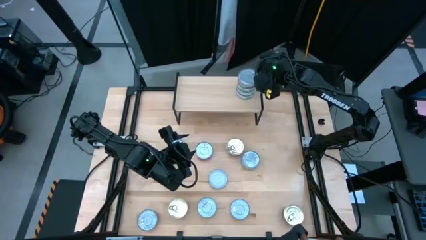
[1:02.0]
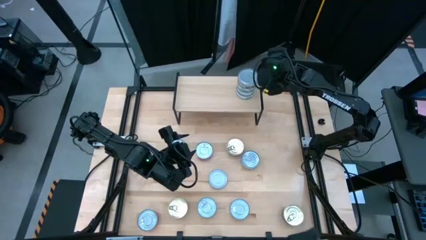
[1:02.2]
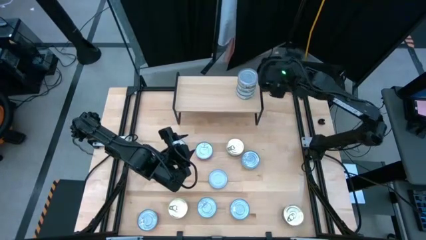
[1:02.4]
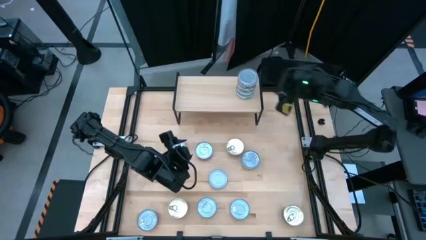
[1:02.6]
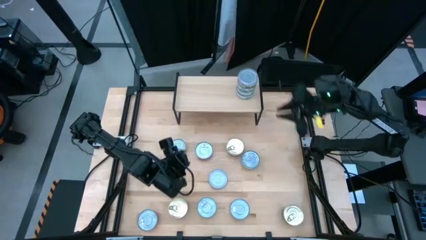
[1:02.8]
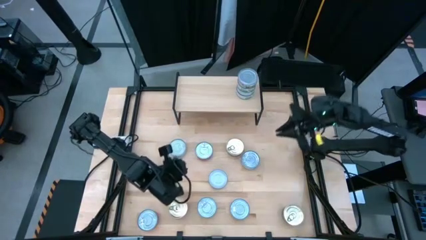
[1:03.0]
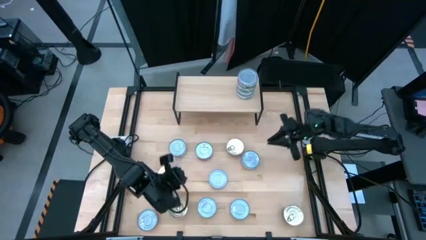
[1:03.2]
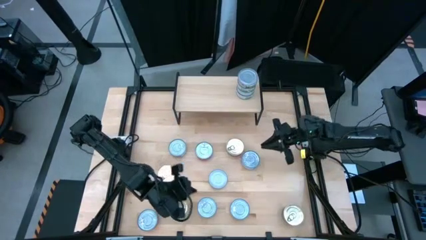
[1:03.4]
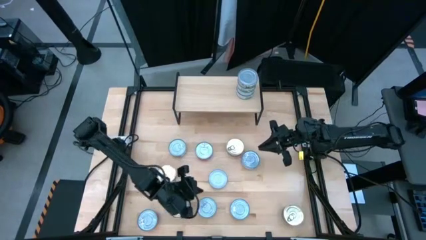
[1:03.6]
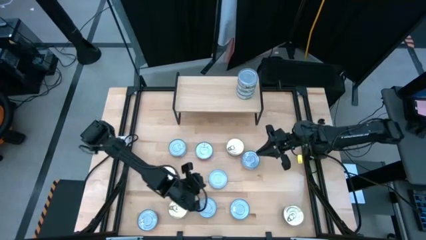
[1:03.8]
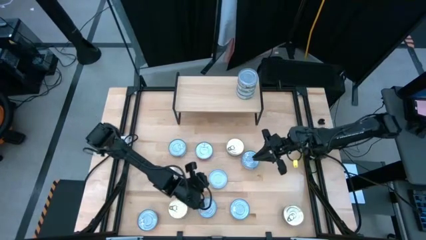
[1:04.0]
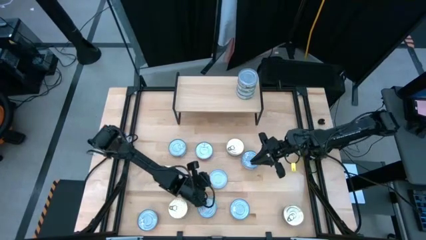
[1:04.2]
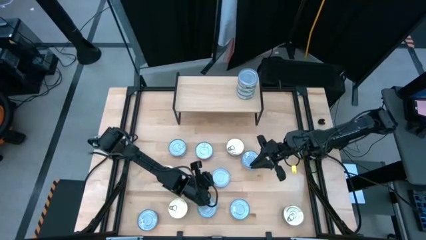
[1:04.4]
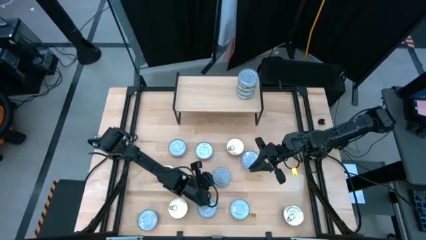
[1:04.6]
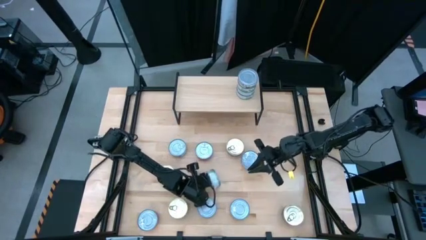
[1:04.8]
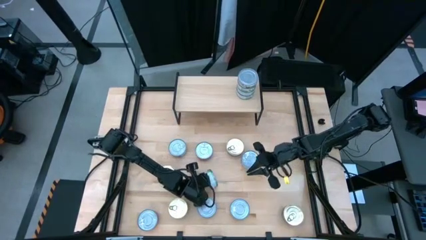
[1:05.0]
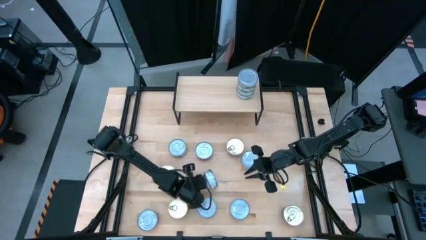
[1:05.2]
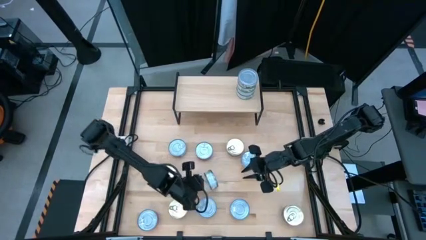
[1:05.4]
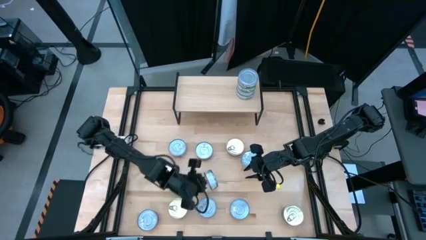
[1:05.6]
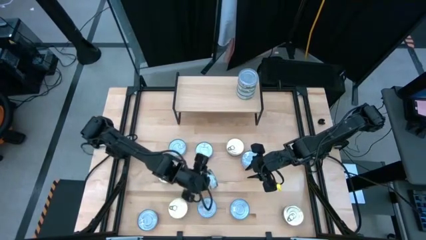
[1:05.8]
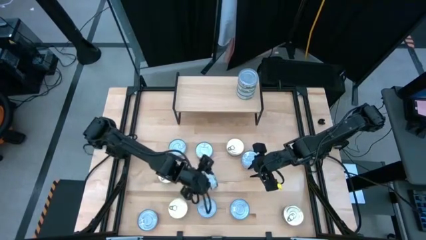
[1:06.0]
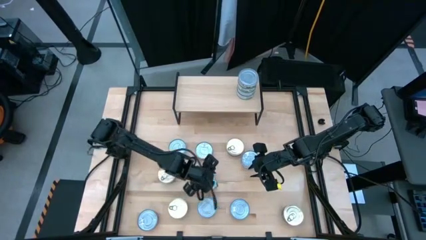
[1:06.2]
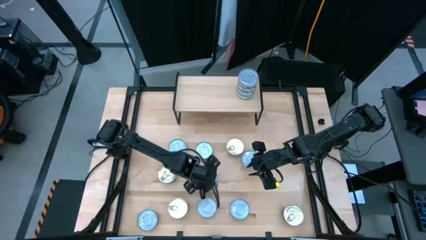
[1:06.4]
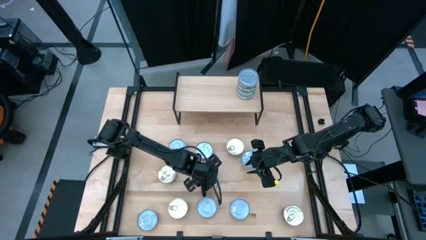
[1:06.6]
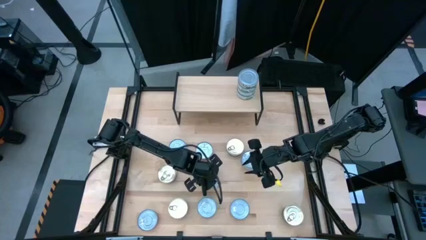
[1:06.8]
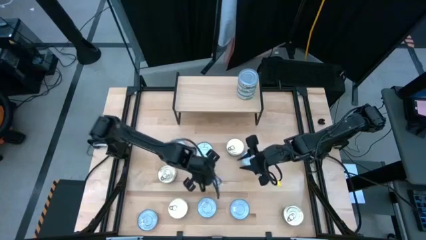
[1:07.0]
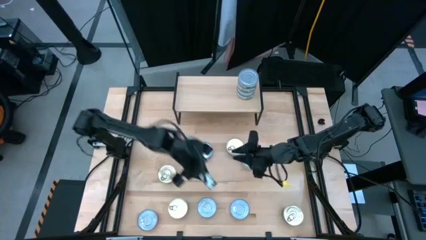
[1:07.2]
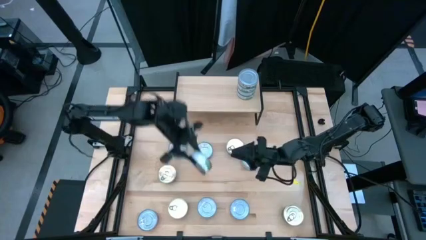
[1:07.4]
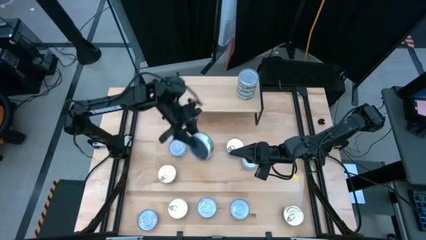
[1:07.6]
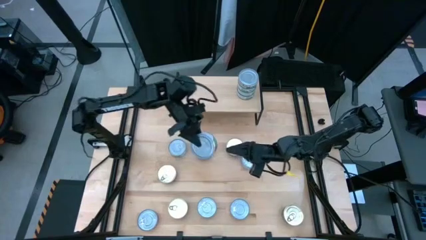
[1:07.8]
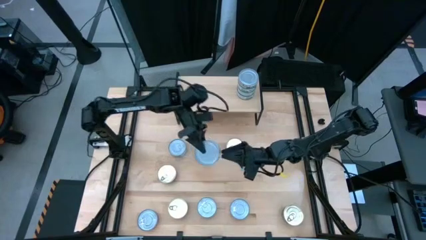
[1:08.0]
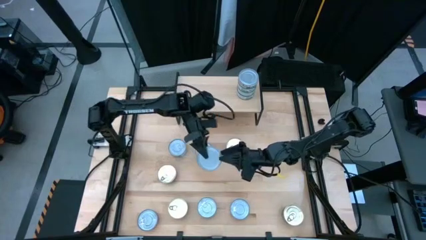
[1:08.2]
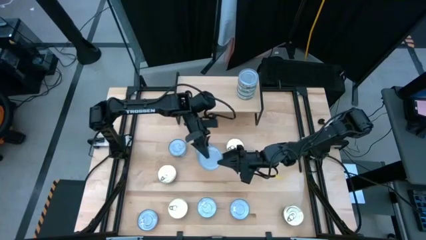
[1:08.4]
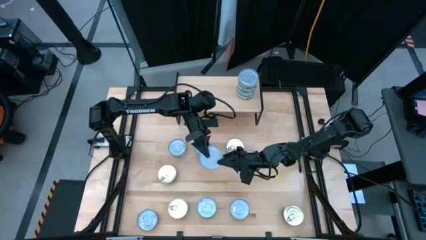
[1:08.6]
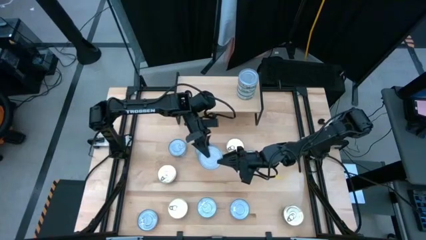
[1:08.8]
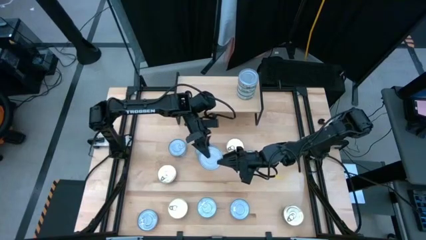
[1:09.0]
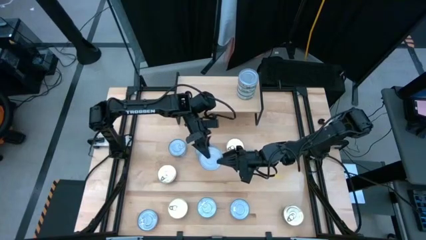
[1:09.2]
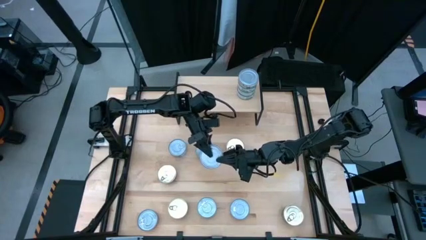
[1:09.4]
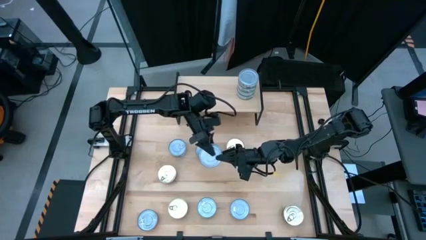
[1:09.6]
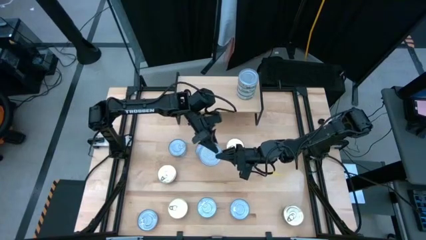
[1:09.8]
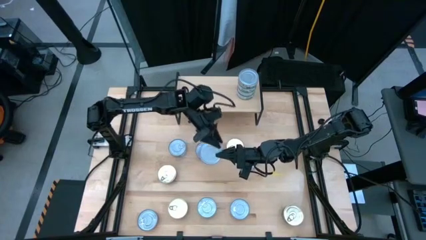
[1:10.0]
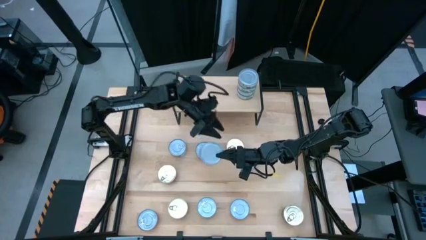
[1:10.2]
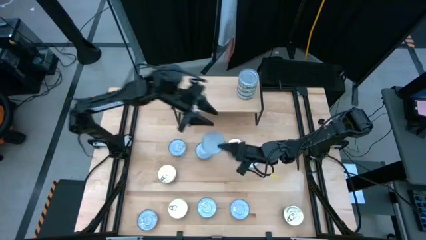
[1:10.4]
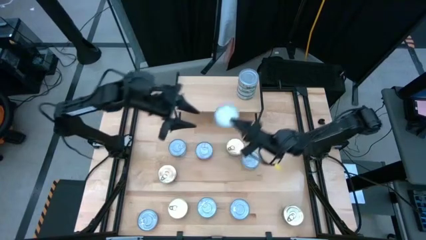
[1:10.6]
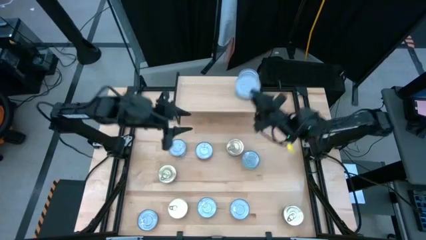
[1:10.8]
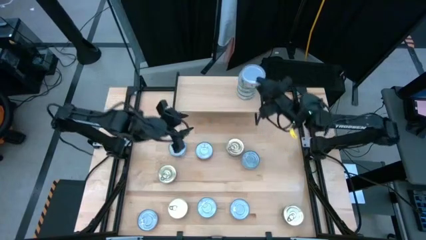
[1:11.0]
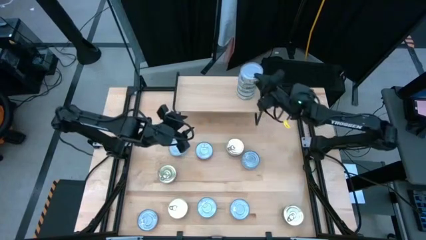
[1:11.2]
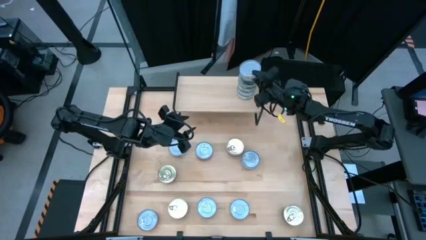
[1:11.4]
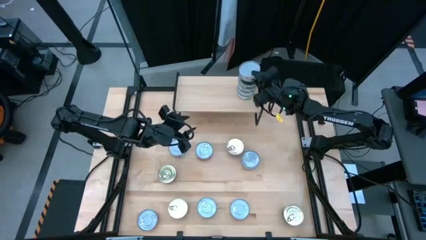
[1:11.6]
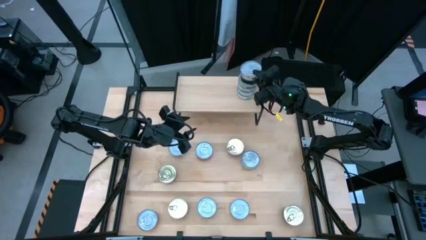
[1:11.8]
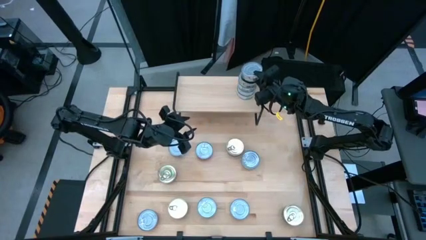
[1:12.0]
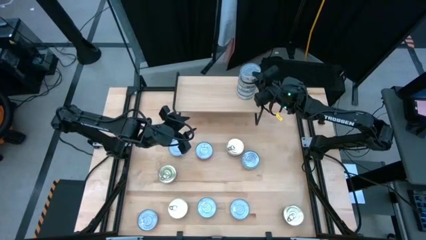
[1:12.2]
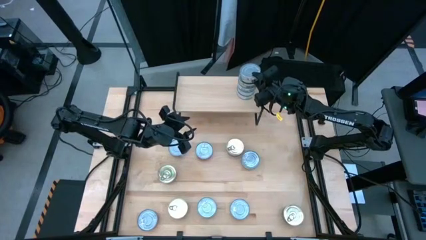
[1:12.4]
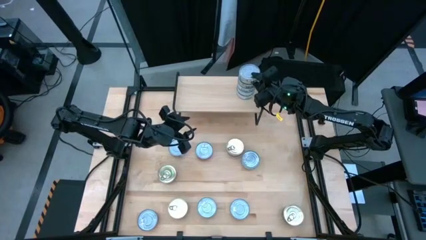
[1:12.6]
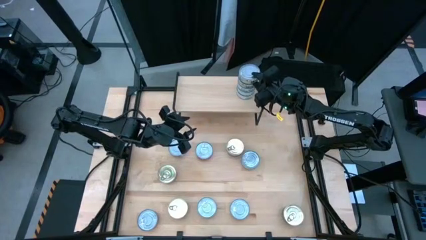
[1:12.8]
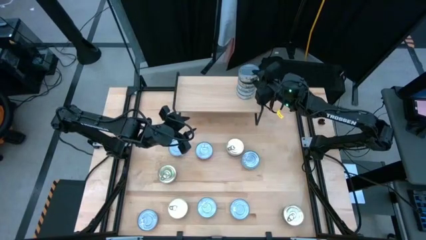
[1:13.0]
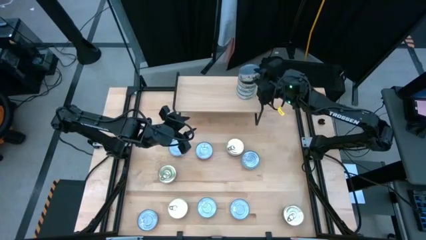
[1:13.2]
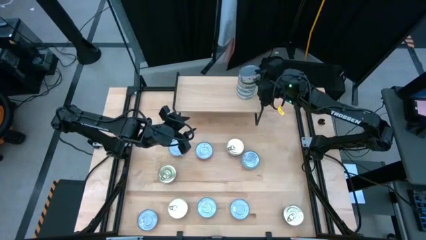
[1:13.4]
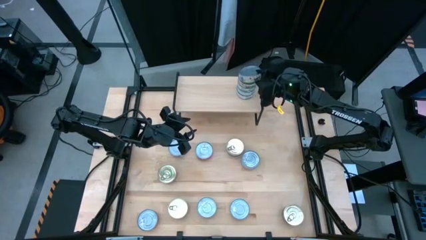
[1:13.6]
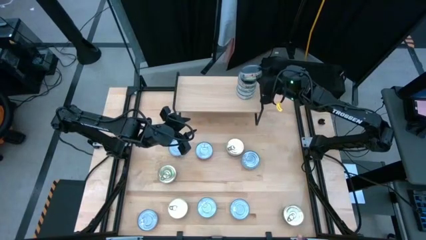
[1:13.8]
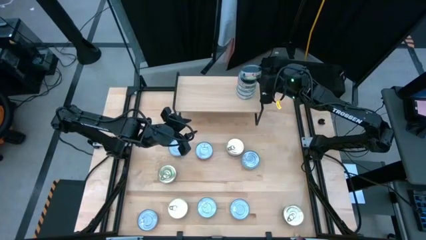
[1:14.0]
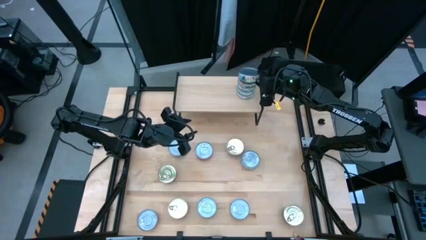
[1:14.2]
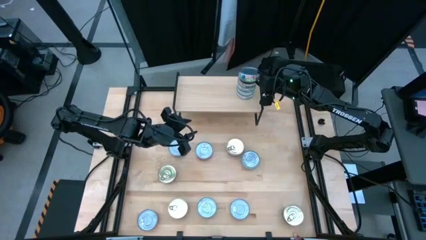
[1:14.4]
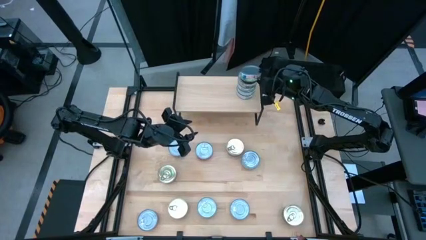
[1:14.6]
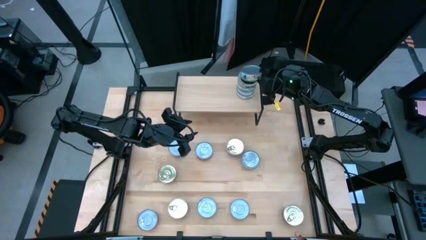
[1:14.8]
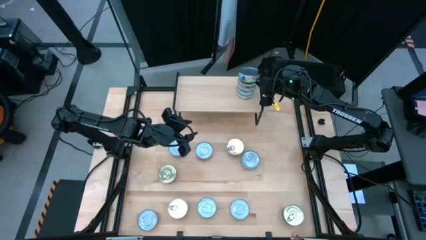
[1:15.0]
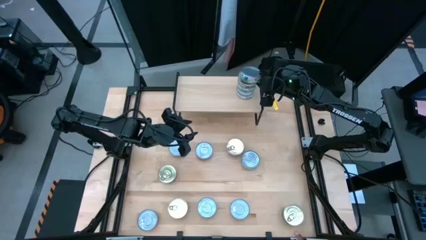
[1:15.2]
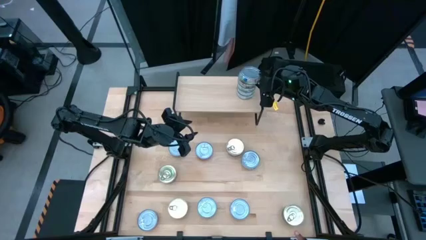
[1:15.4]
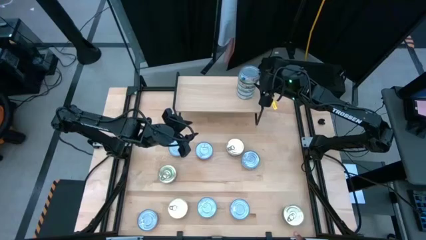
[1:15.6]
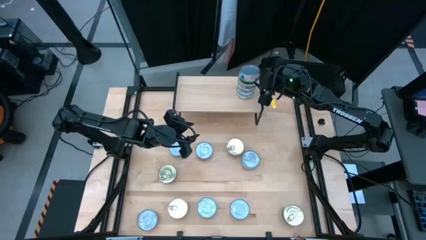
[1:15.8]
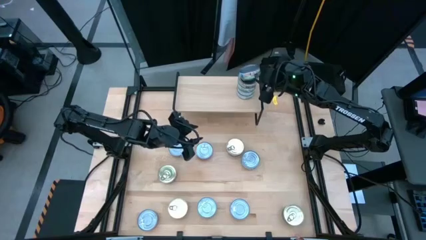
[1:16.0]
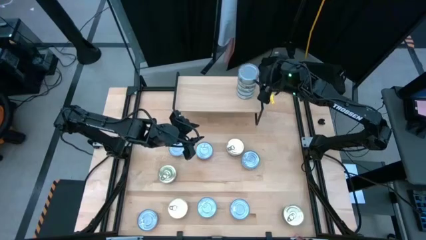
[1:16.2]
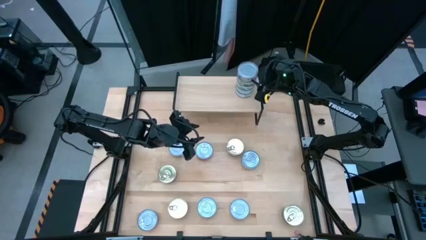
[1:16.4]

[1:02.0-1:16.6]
Task: Stack canned seafood by type on shelf
Stack the green tuna can on top of the other green tuna cans on the shelf
